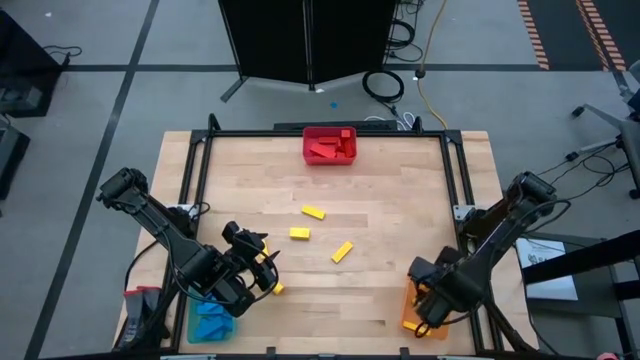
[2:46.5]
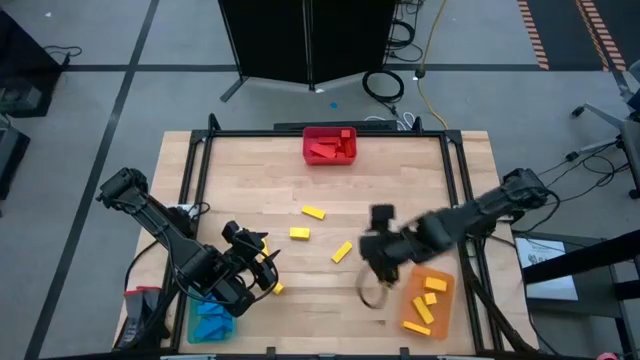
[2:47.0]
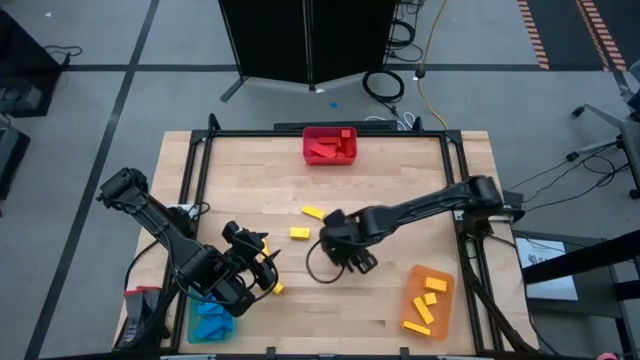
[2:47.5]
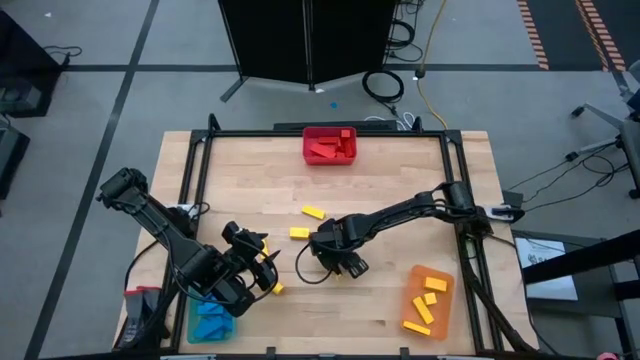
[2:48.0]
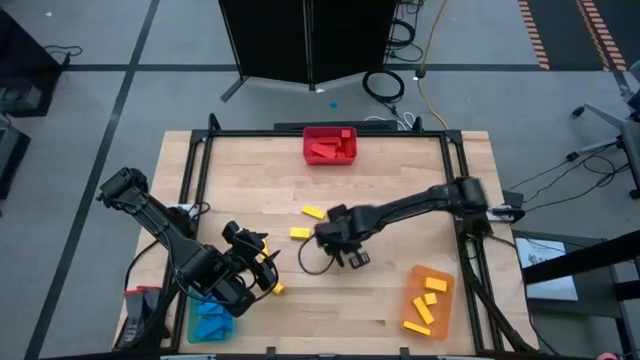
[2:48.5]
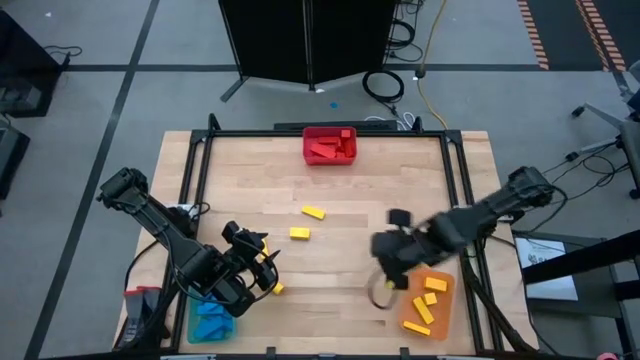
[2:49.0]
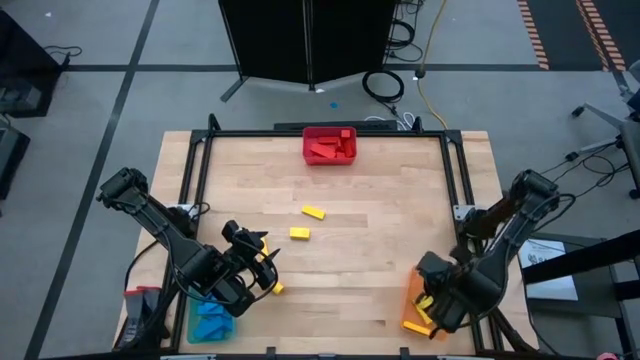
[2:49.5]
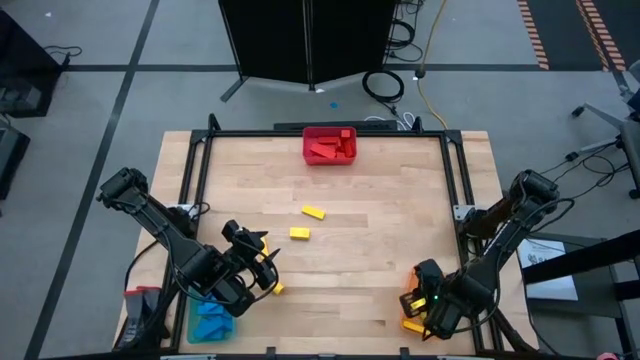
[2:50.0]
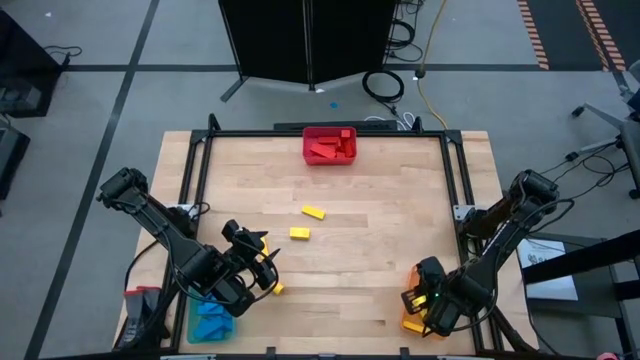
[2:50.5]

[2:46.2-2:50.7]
Task: Sort blocks
Put the yellow block into the orange bin

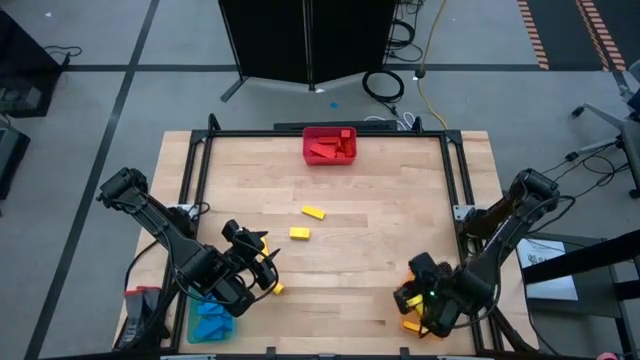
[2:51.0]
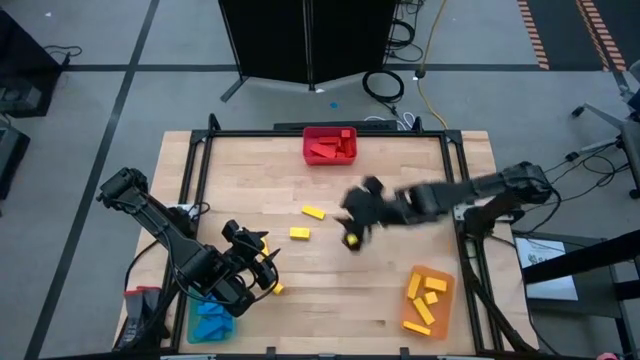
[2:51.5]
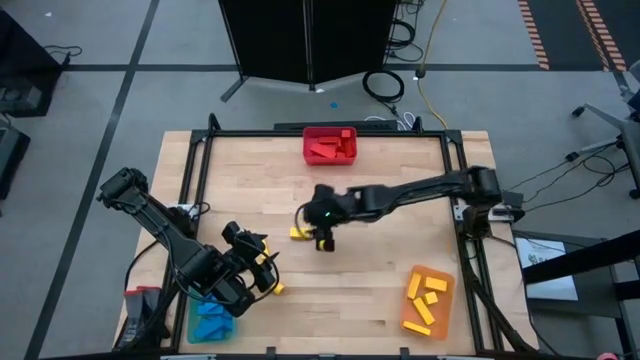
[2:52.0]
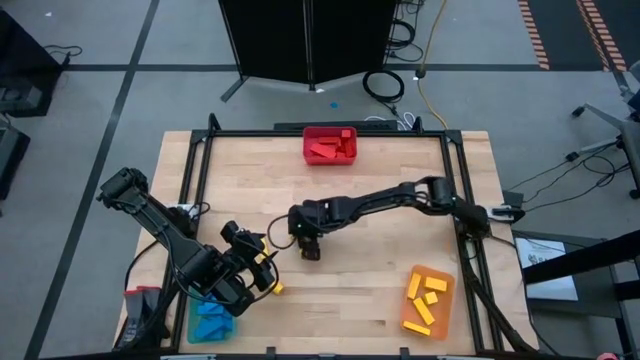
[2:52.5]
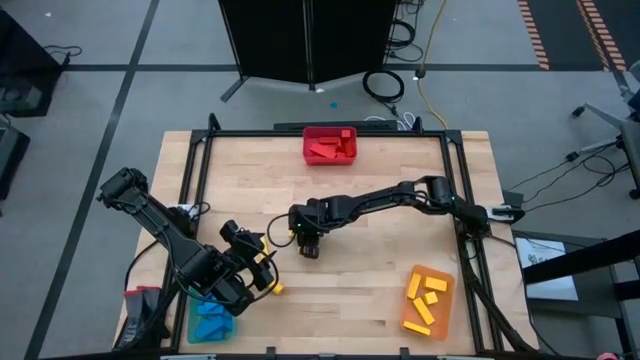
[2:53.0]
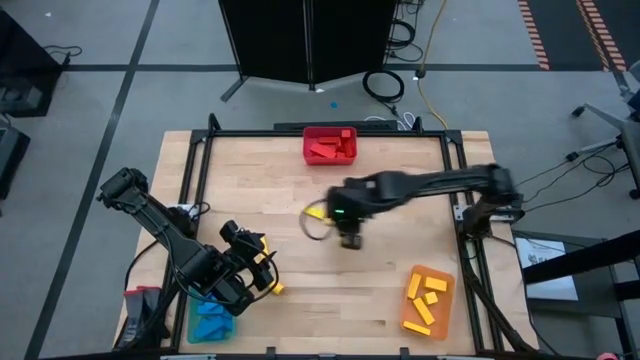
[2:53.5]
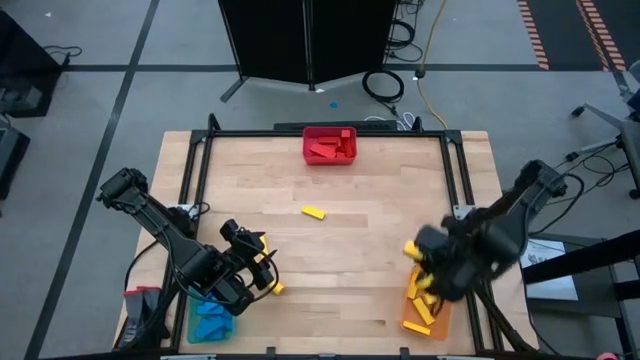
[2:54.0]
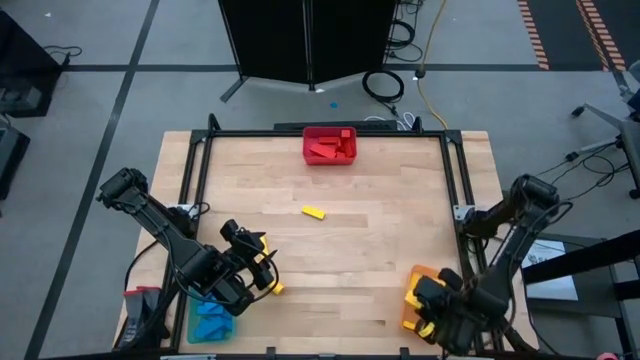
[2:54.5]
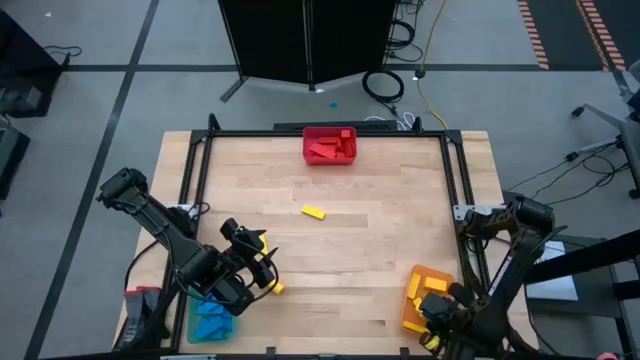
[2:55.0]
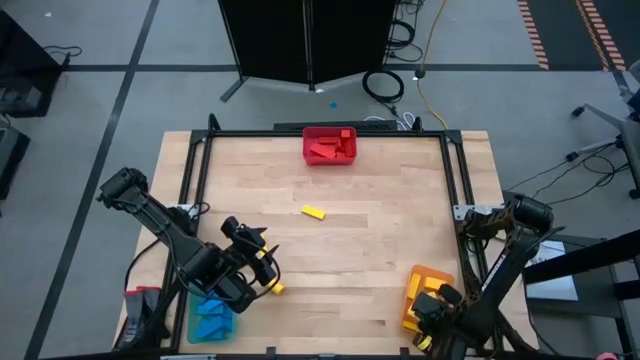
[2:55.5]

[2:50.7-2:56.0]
Put the yellow block into the orange bin

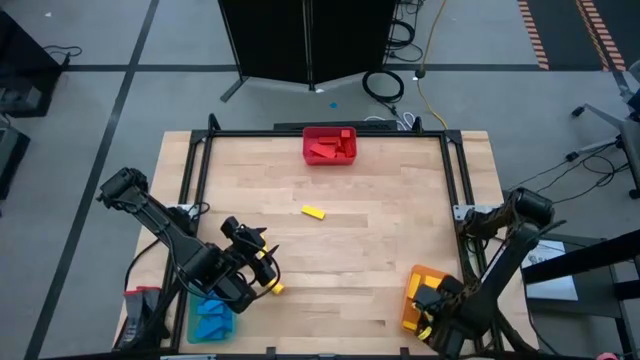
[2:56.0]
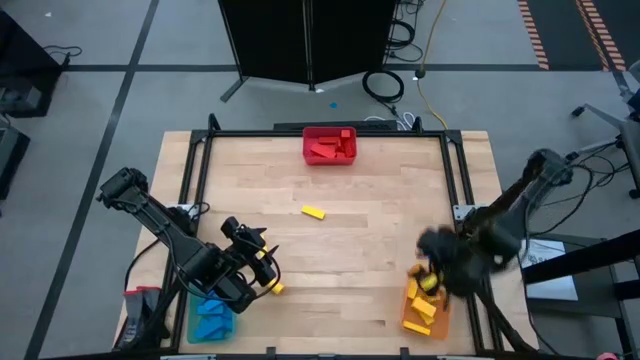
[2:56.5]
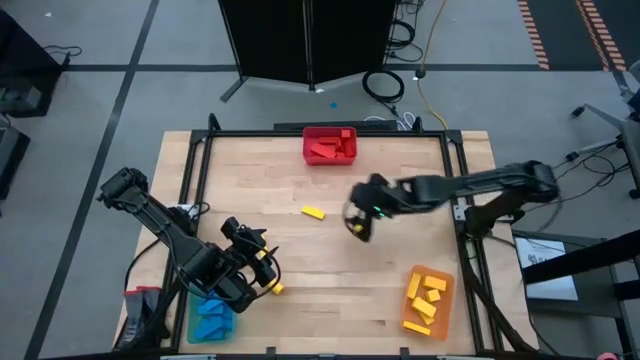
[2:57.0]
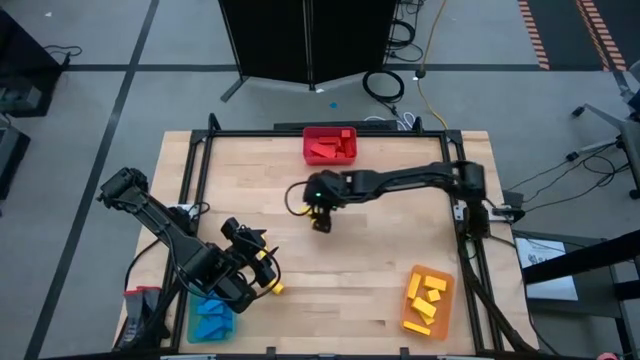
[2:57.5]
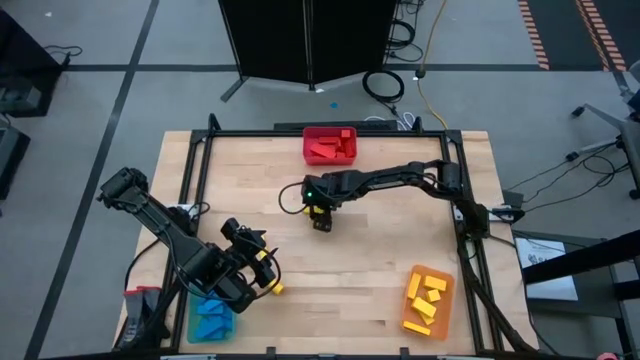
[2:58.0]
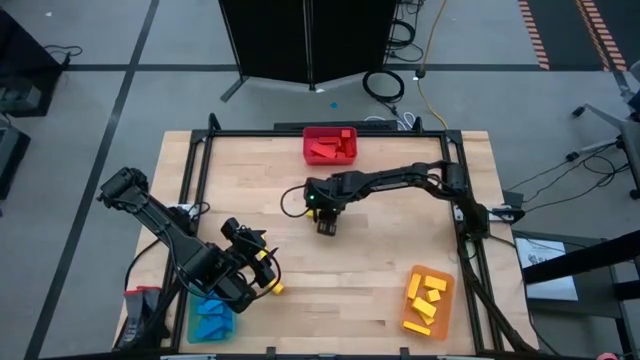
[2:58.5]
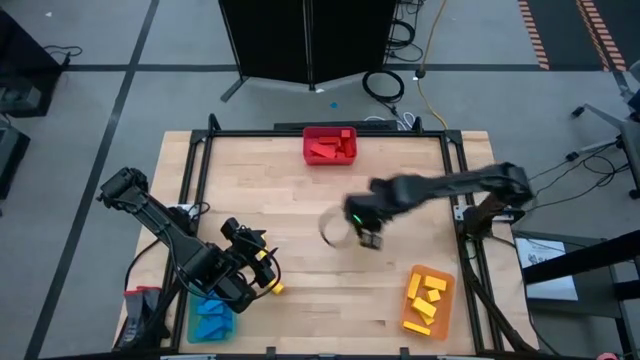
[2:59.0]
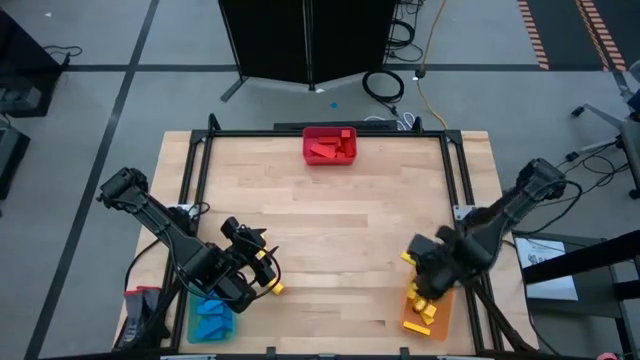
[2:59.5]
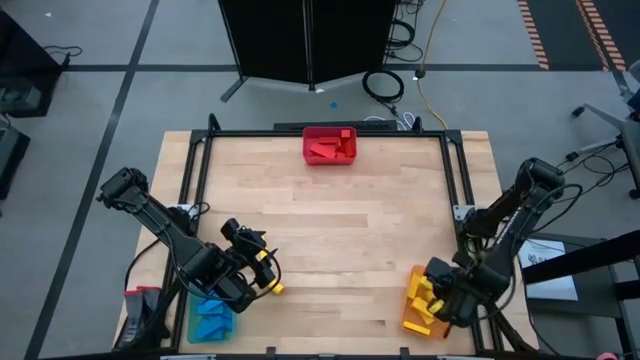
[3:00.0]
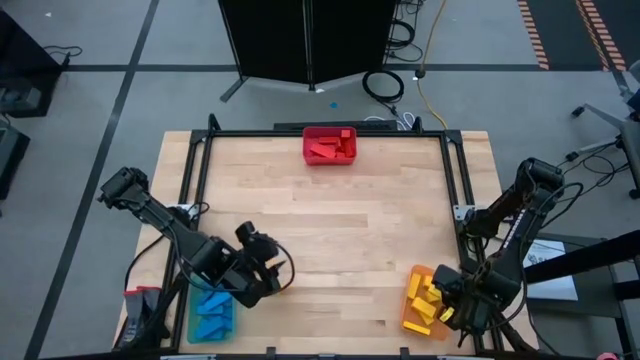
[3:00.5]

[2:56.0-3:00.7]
Put the yellow block into the orange bin

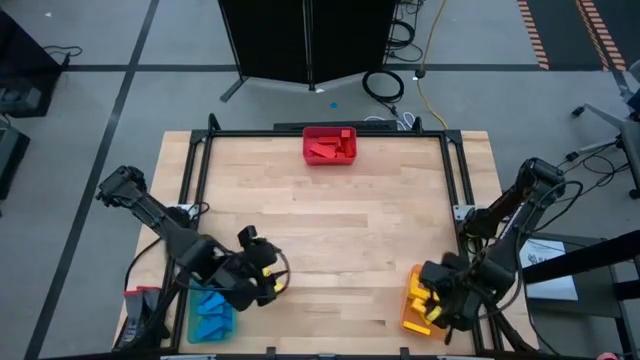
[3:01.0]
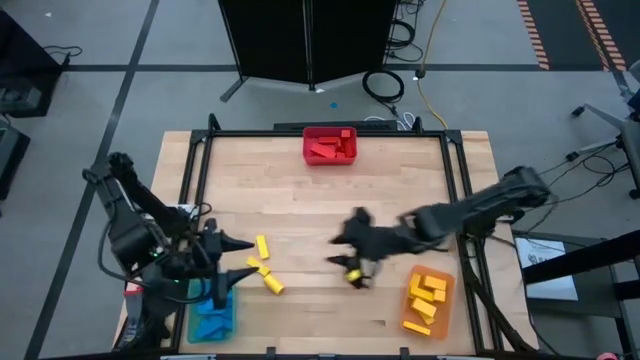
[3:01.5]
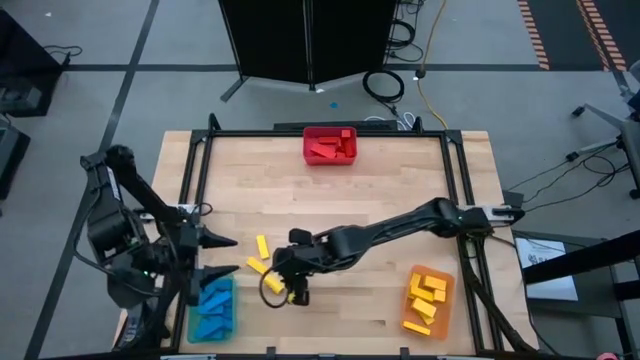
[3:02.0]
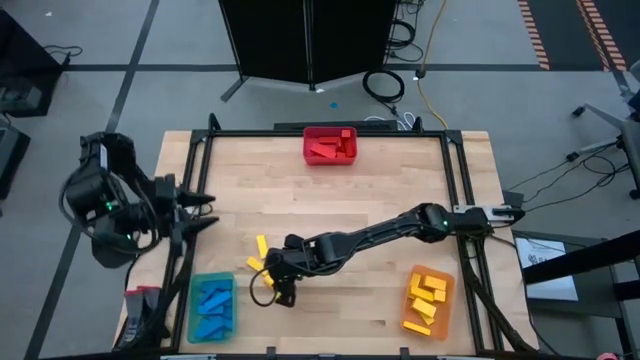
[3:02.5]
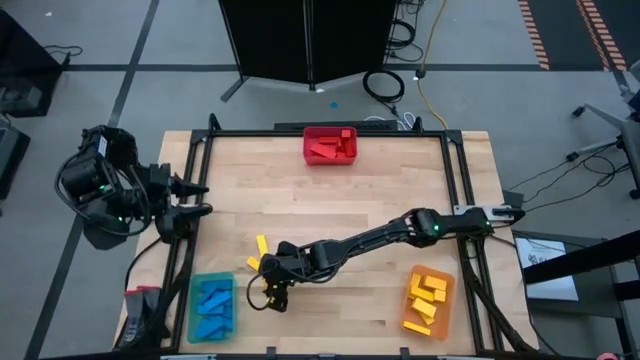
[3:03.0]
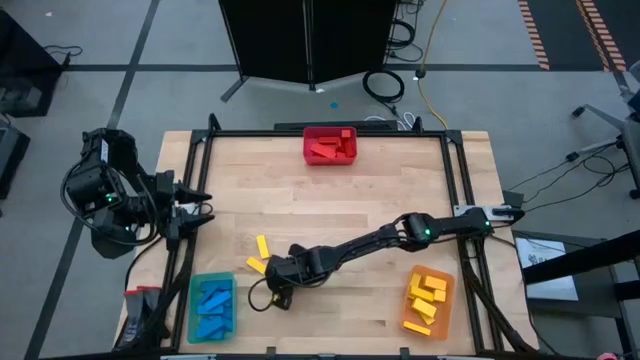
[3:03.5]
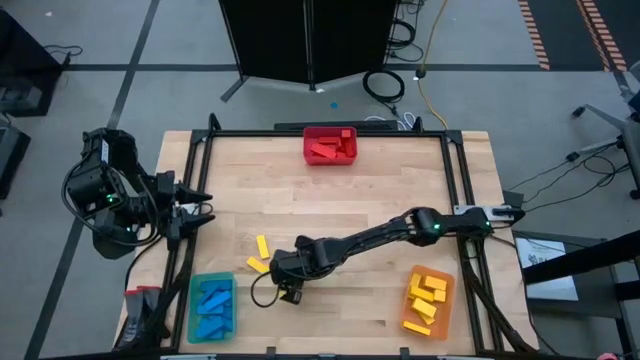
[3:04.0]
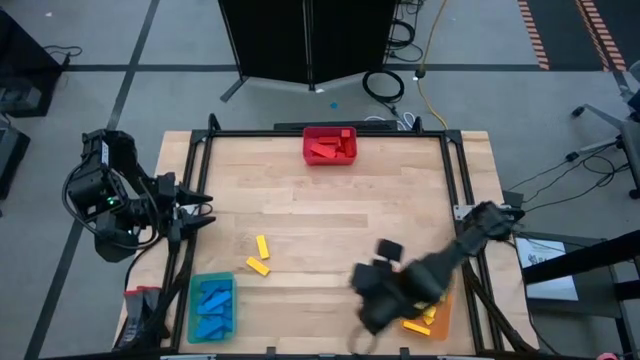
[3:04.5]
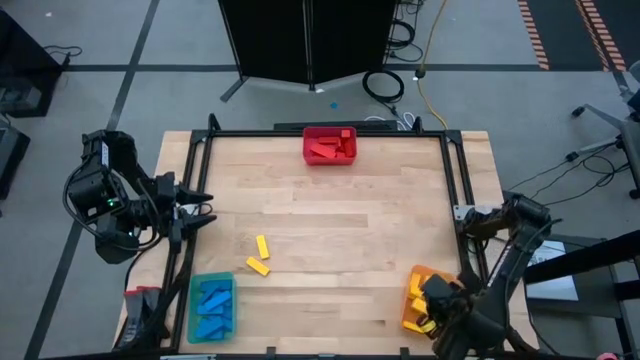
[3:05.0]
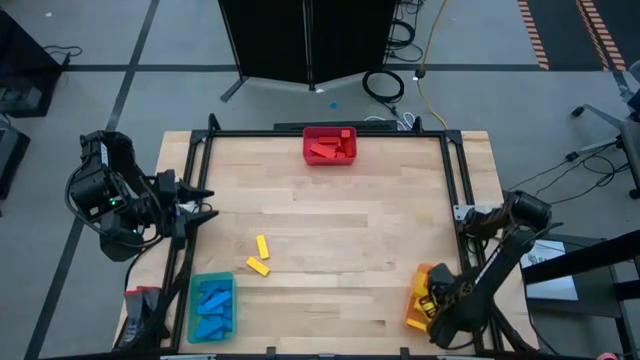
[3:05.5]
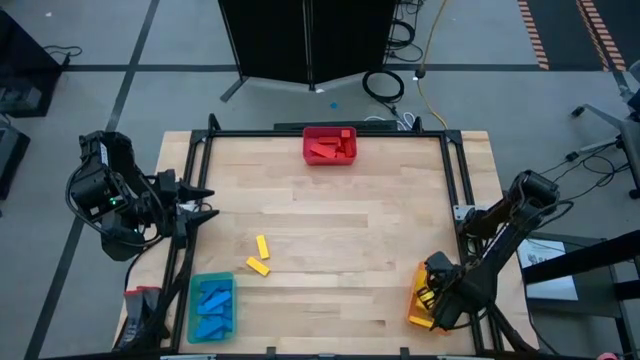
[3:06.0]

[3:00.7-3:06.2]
Put the yellow block into the orange bin
